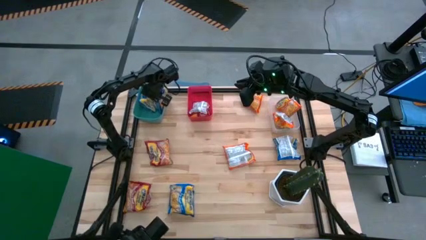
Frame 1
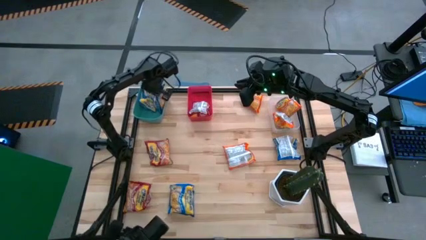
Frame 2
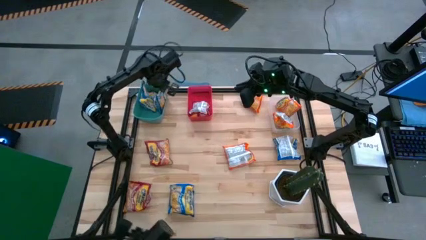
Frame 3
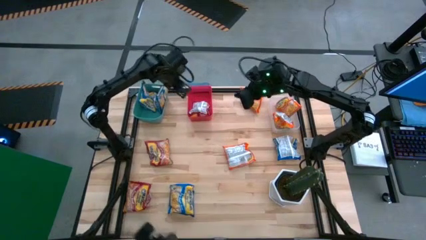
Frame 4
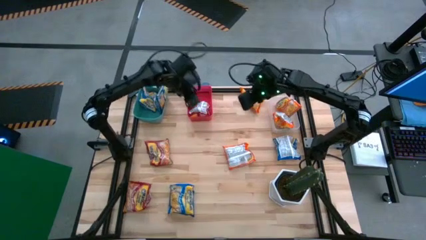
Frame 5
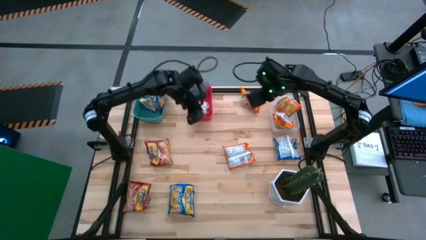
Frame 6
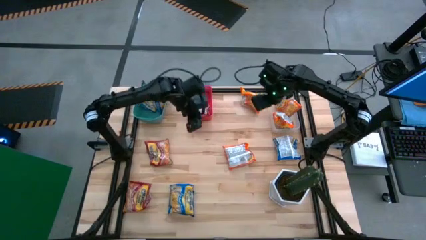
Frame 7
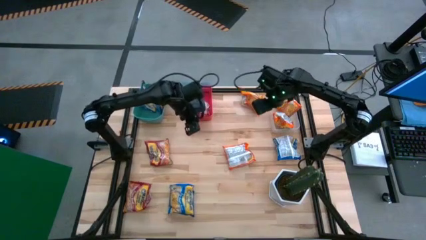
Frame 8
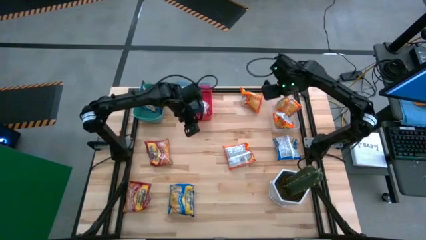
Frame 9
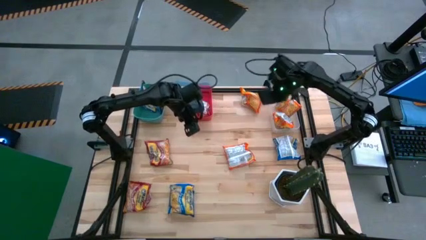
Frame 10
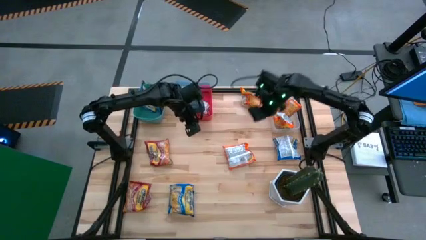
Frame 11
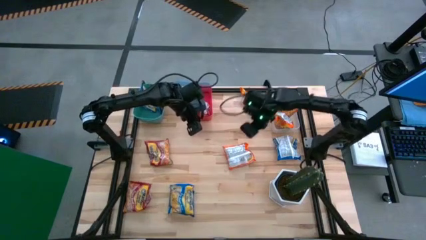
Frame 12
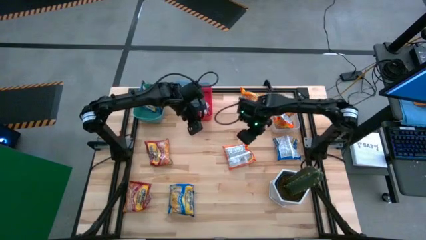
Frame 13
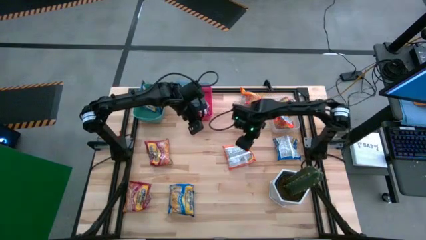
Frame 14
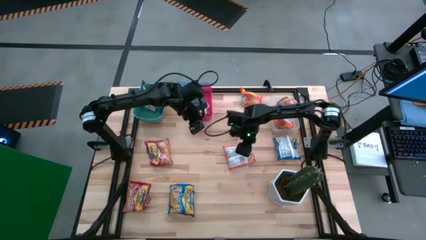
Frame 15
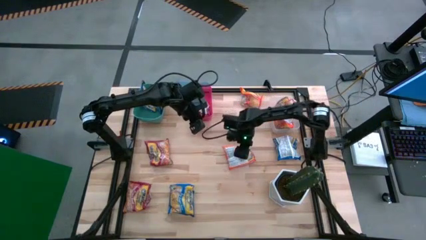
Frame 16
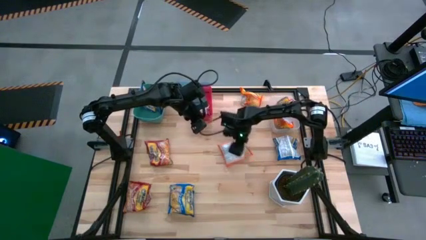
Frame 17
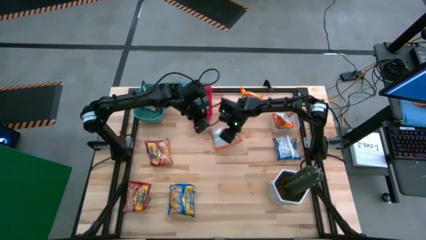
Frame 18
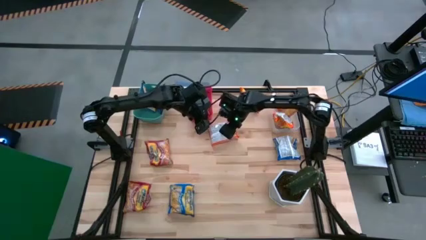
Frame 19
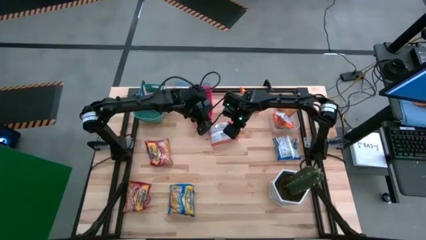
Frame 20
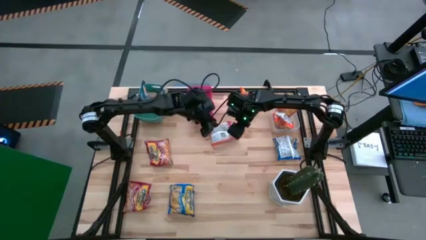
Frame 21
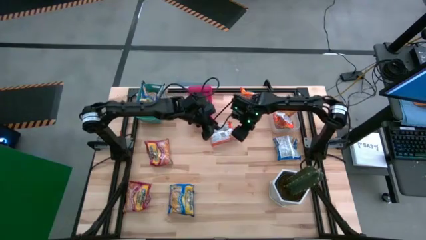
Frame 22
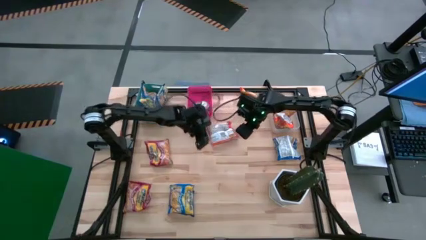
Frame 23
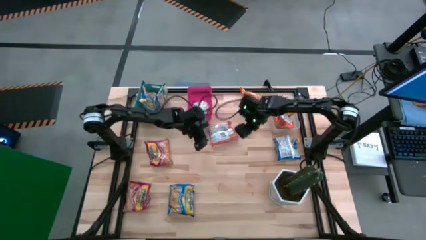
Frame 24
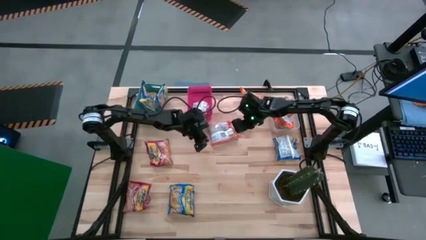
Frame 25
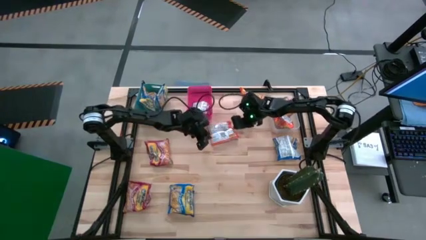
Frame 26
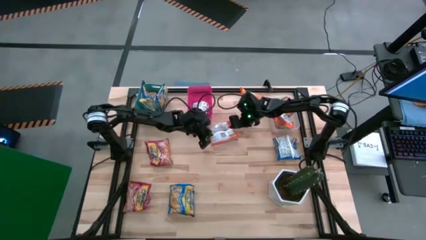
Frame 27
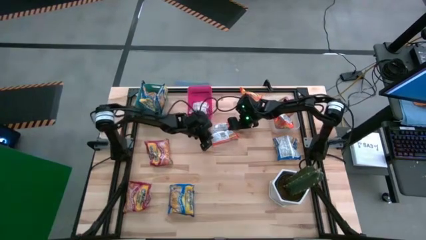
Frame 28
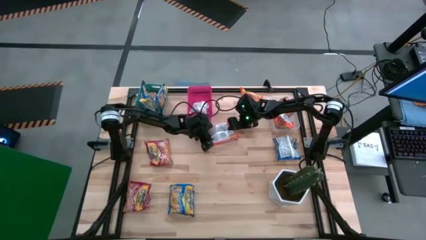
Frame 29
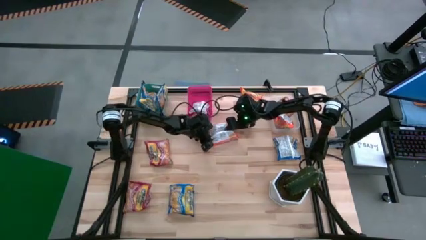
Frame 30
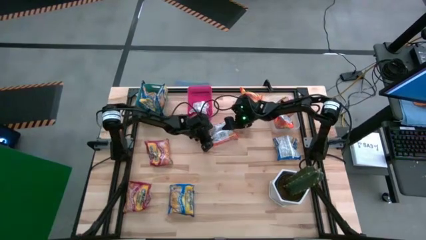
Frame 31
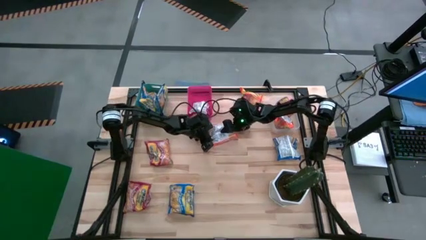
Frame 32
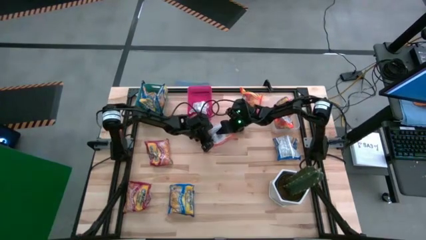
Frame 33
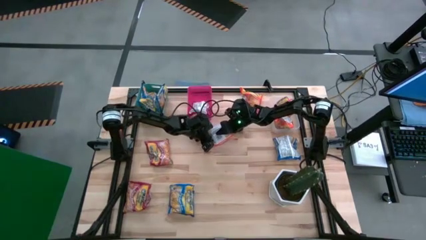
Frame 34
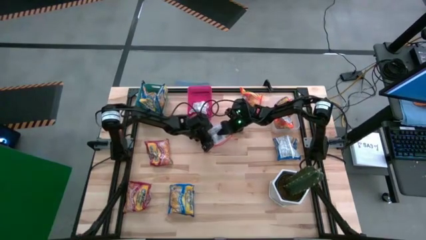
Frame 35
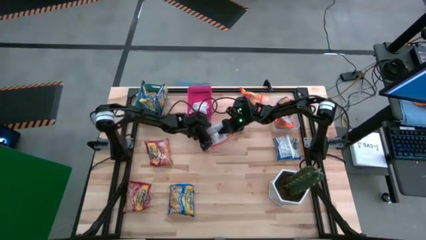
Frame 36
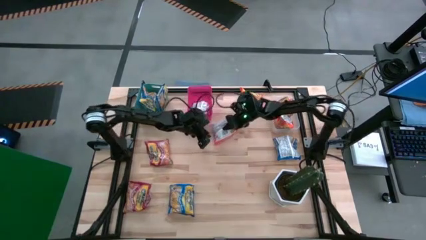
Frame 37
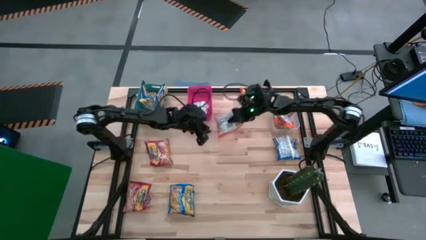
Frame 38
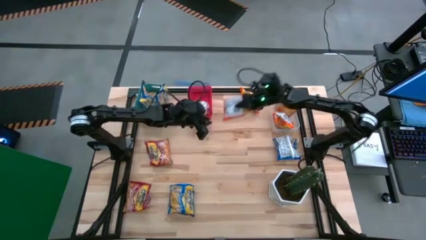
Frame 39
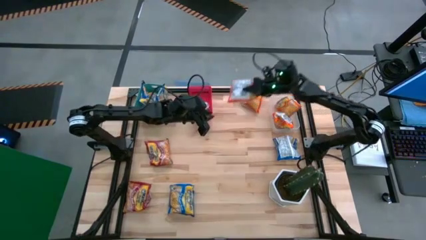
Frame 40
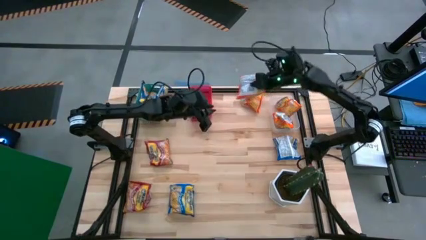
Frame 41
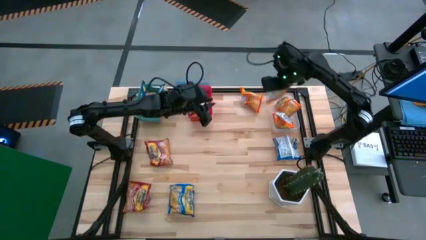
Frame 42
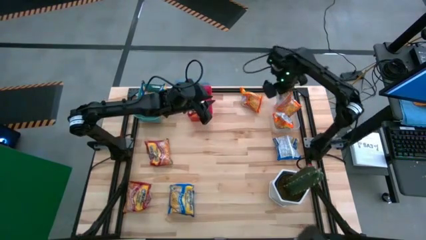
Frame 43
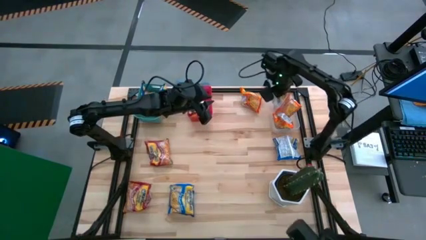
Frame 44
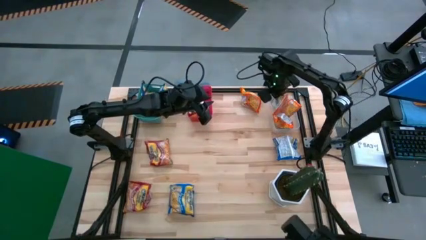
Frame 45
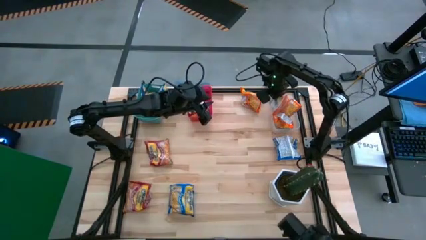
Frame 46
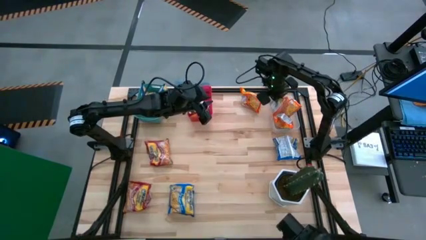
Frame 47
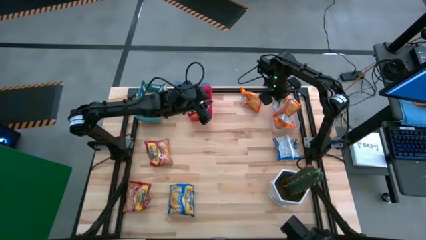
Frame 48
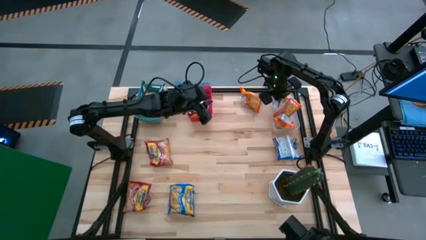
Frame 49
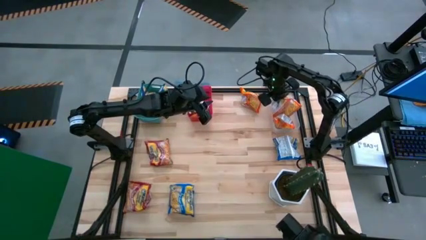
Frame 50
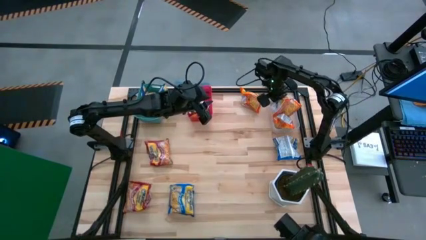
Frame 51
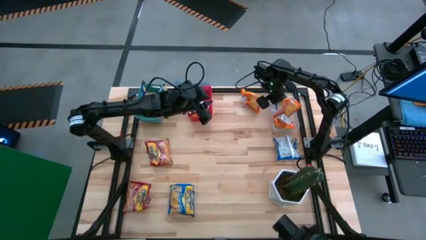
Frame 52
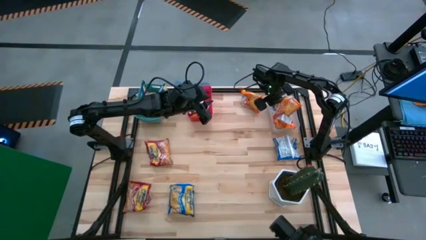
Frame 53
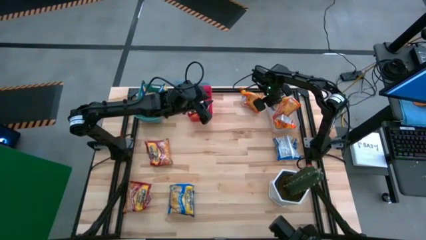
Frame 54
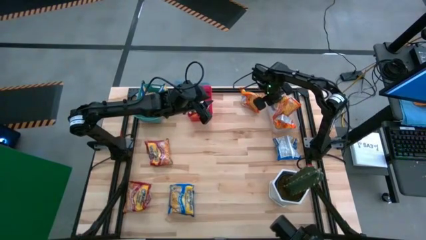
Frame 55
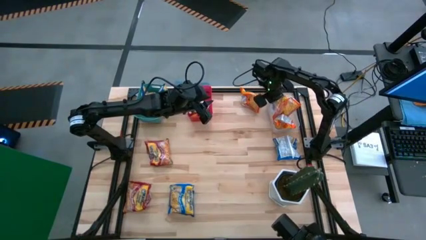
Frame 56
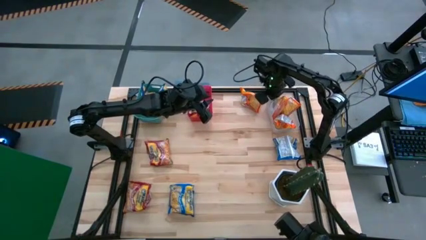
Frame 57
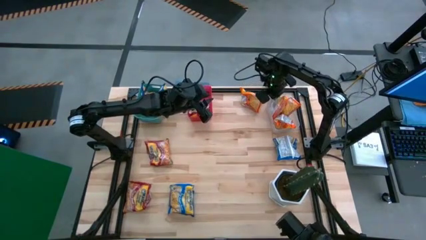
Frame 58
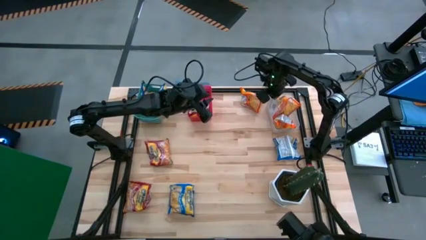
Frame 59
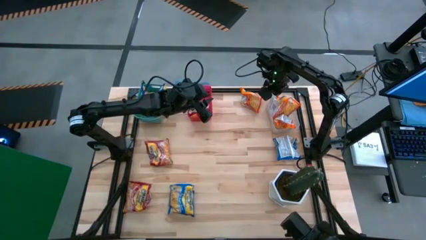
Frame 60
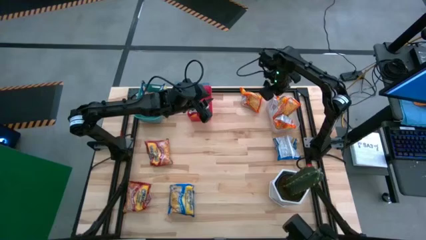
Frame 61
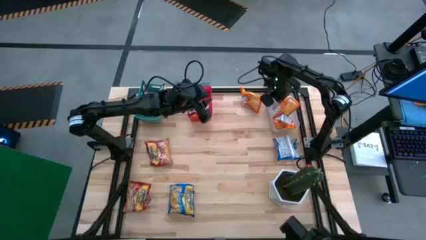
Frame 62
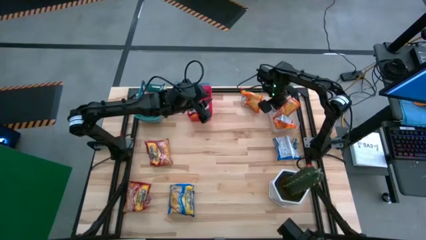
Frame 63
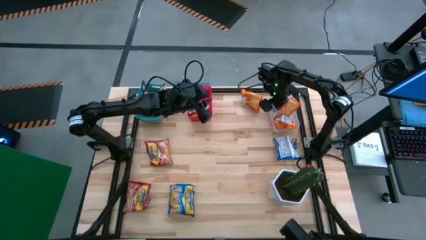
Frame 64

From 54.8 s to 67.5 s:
Task: Sort Maruchan noodles
Put the orange noodle pack into the transparent bin

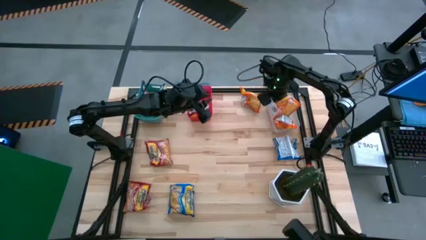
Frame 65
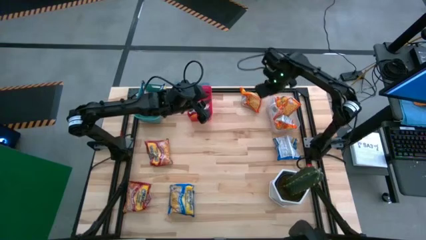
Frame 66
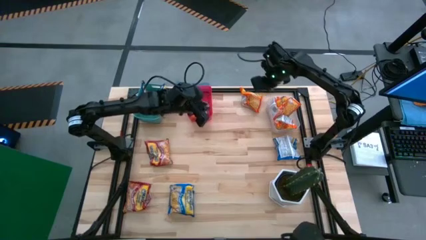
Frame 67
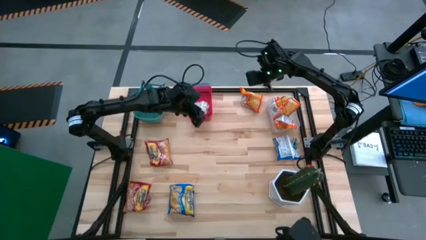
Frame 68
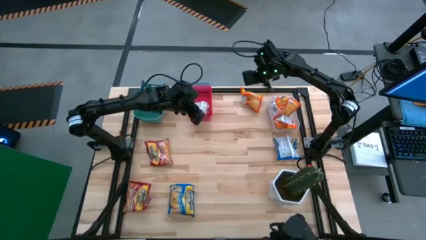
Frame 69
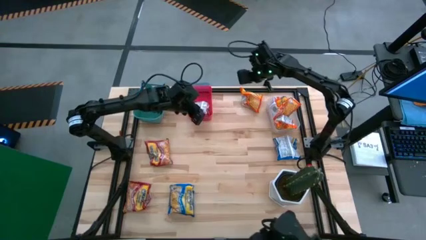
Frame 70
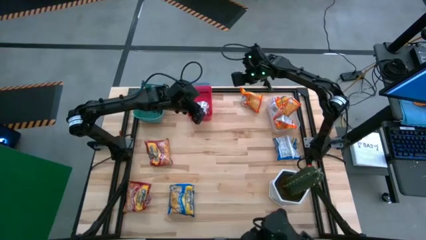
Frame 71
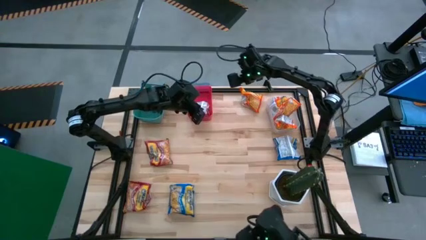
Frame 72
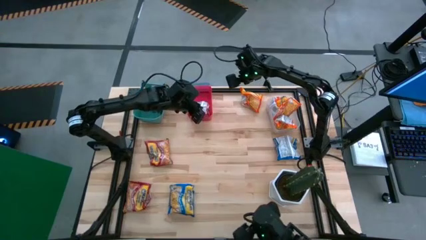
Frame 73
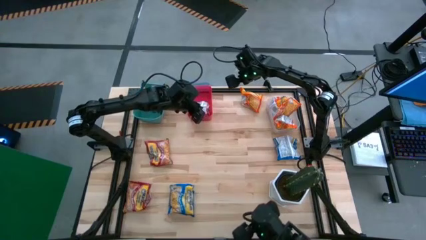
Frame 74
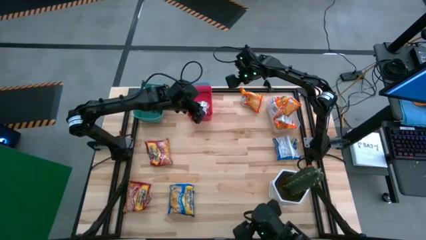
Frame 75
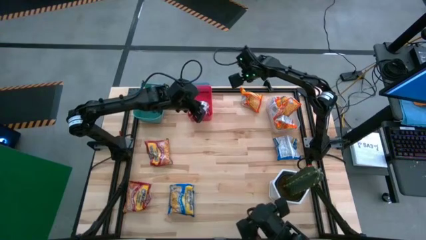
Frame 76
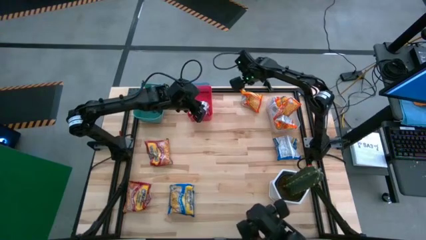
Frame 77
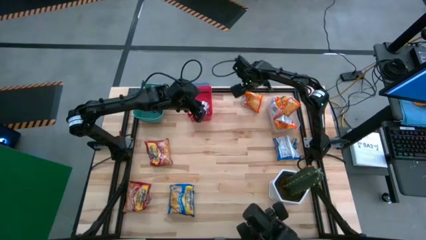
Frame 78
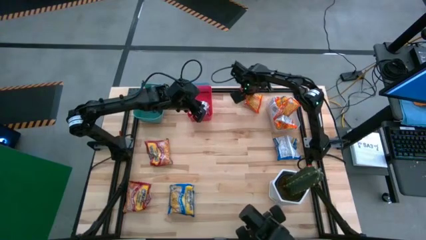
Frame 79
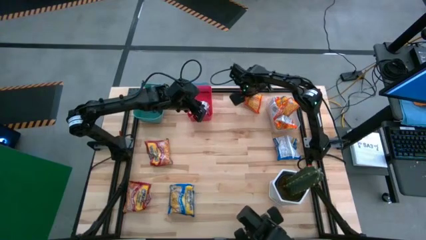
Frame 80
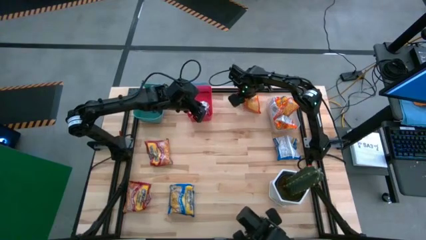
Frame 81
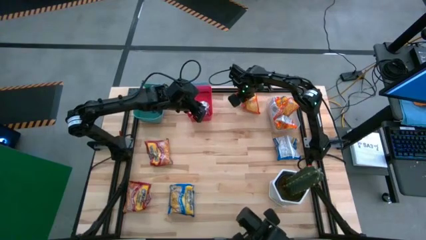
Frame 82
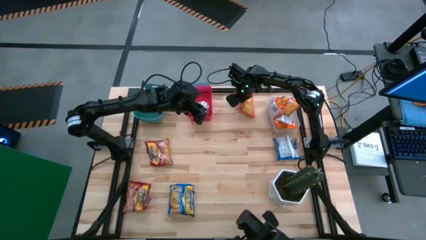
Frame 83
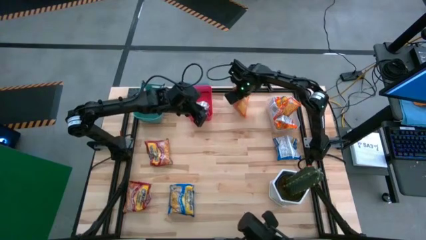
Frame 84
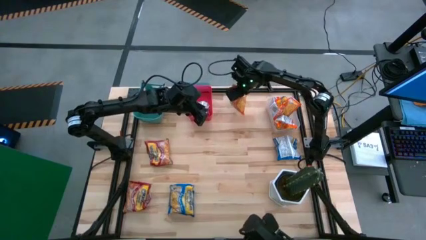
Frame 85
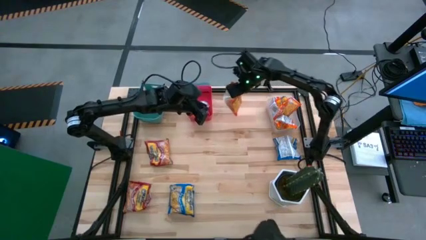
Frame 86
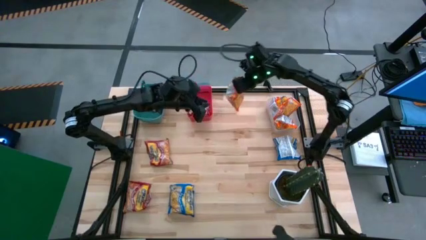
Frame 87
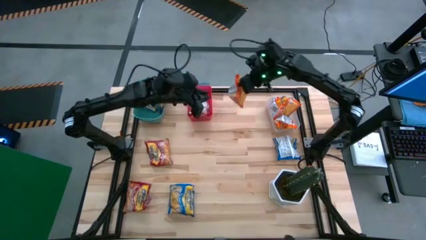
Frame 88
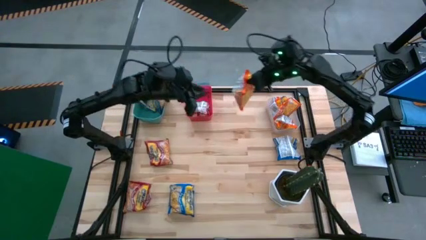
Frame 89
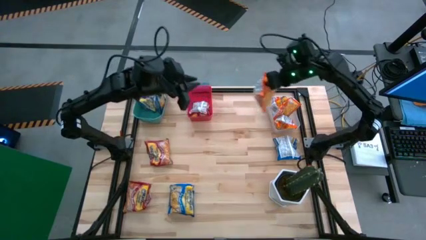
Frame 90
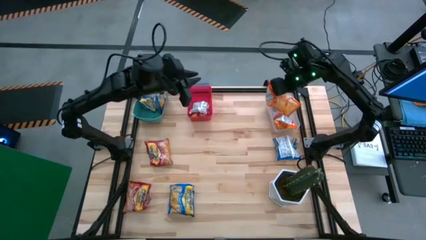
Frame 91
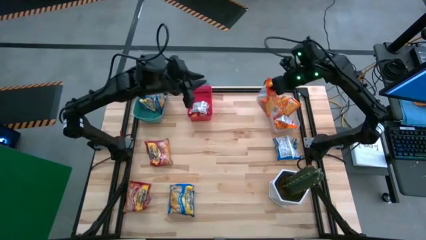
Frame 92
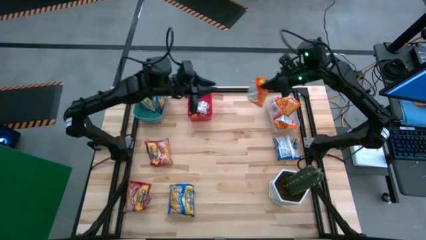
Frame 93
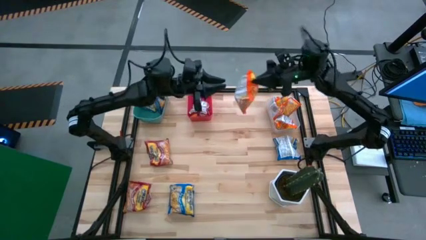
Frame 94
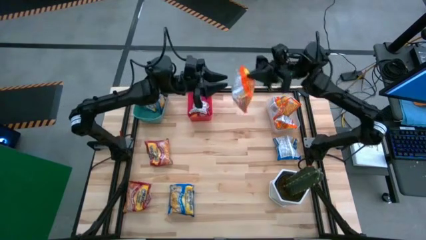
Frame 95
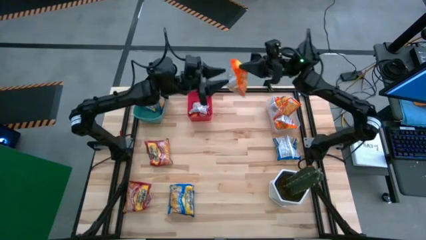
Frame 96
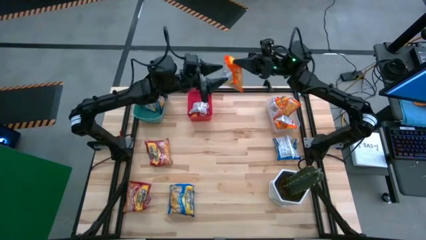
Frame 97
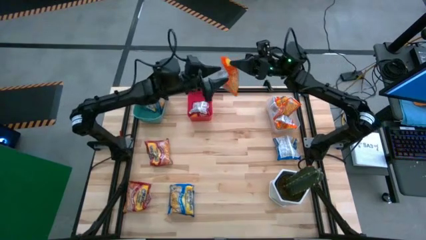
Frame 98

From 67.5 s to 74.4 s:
Put the orange noodle pack into the transparent bin
